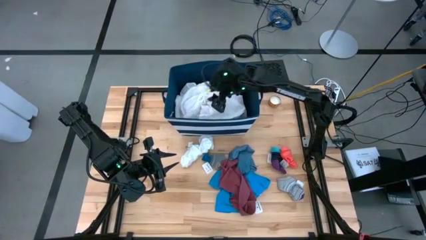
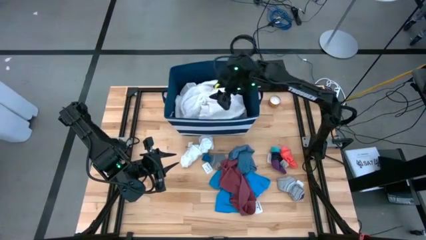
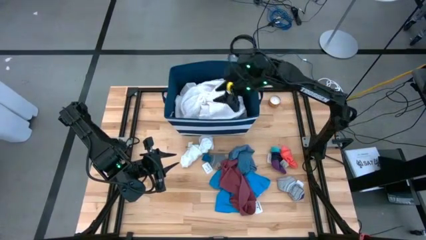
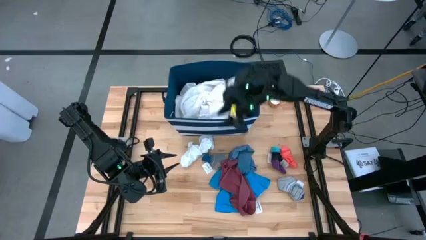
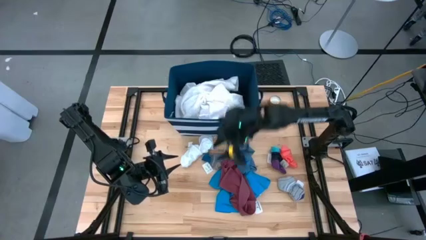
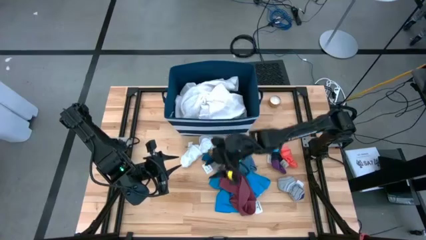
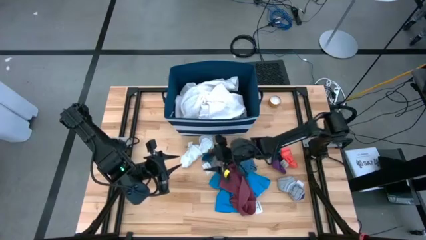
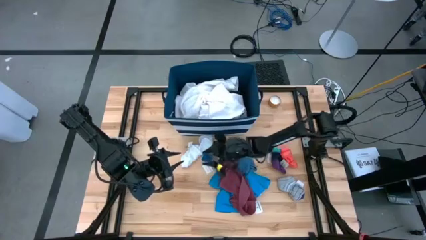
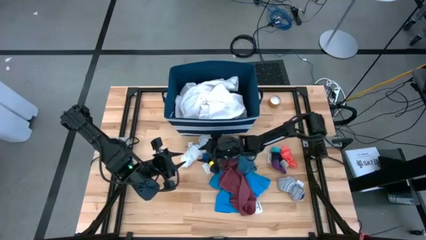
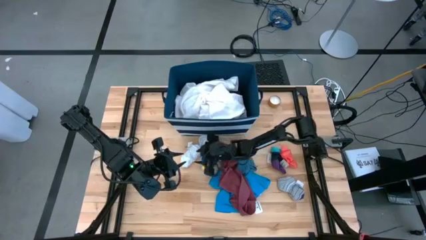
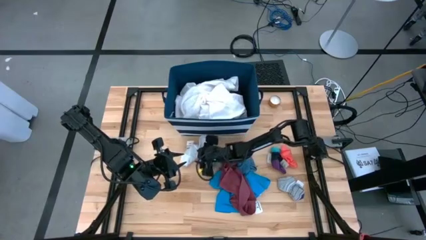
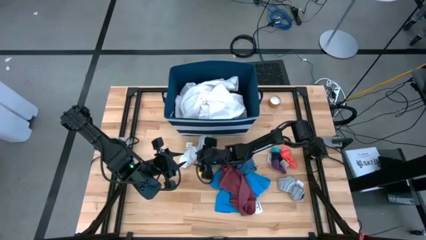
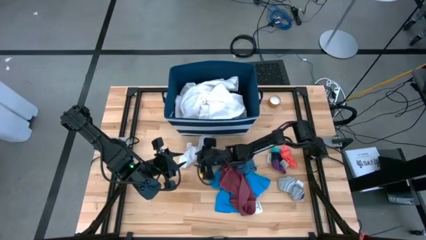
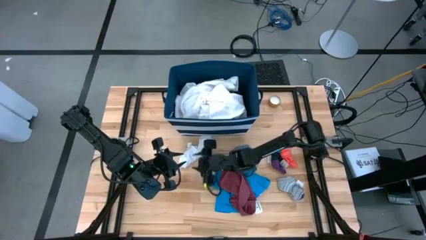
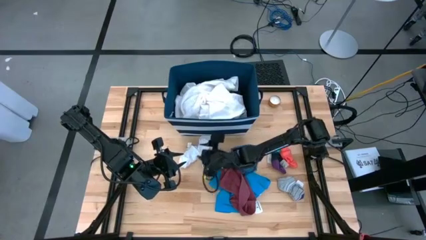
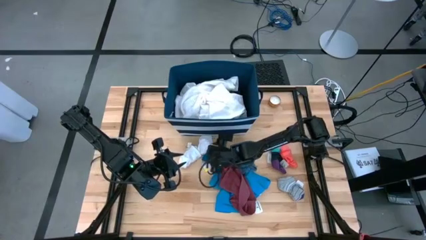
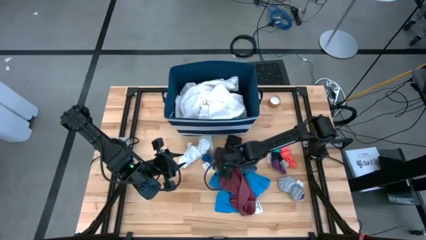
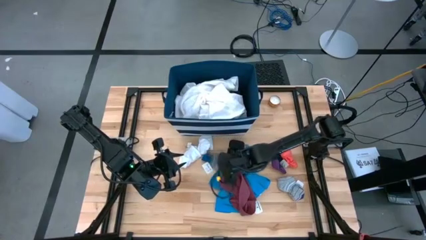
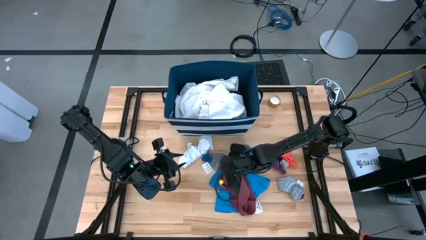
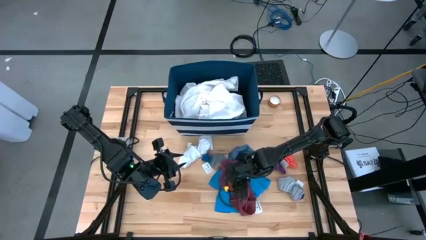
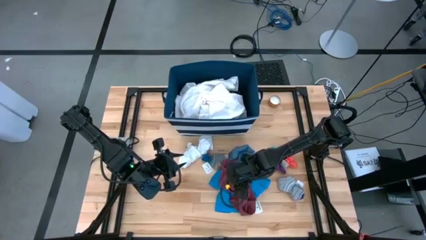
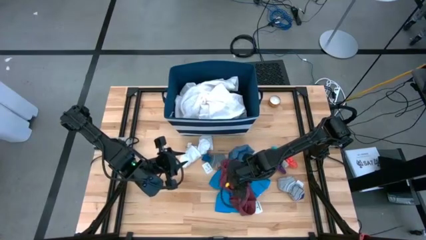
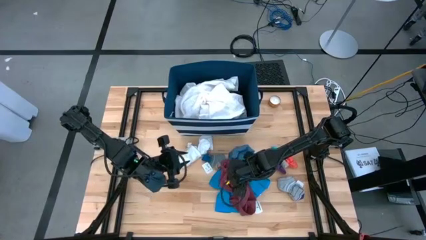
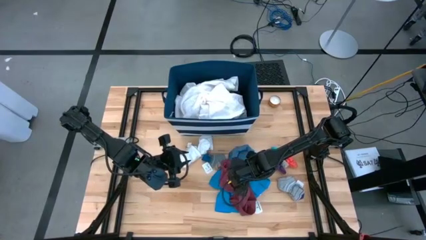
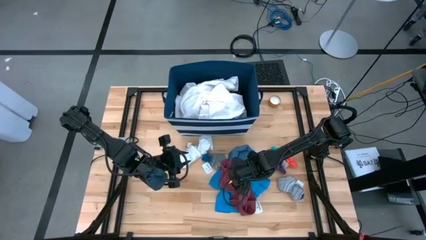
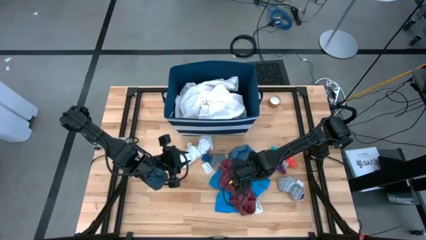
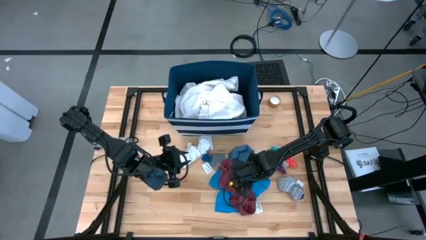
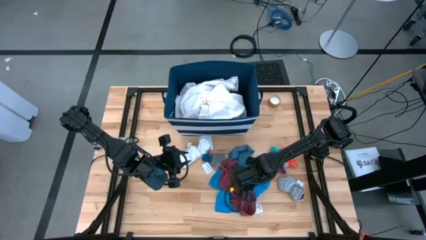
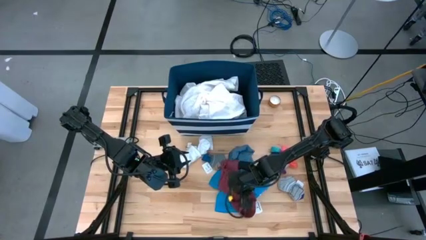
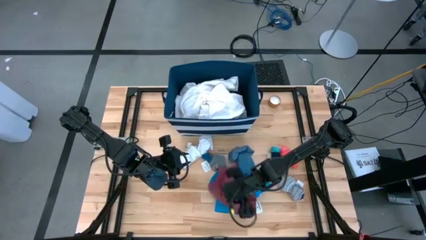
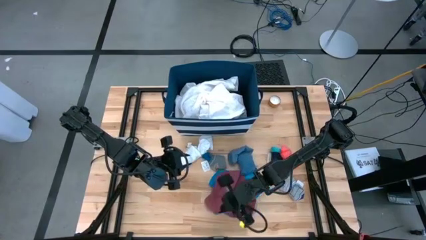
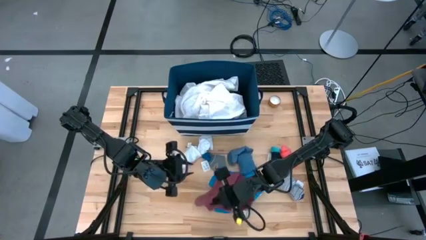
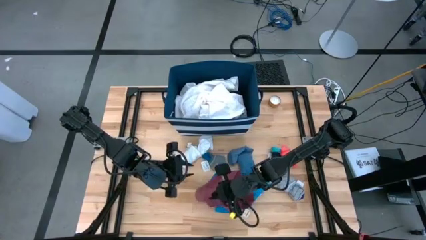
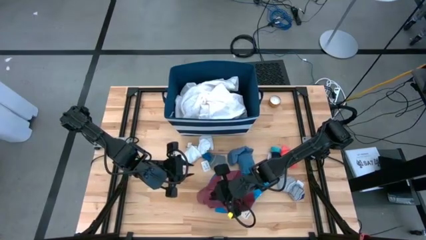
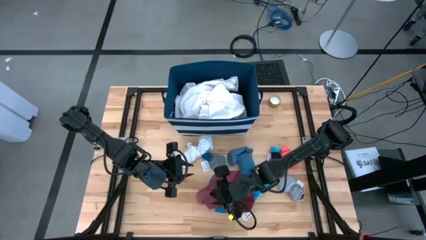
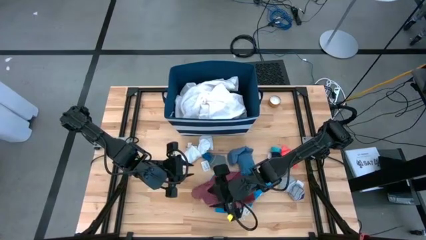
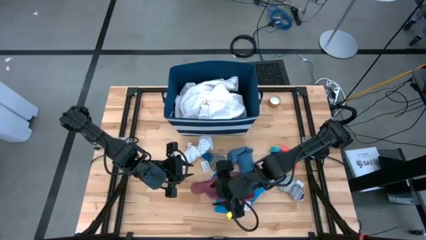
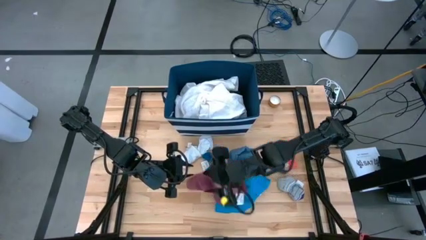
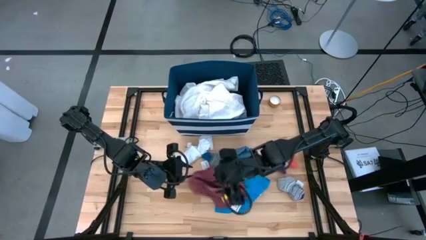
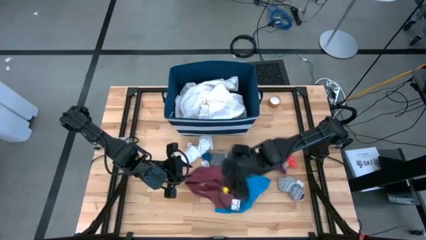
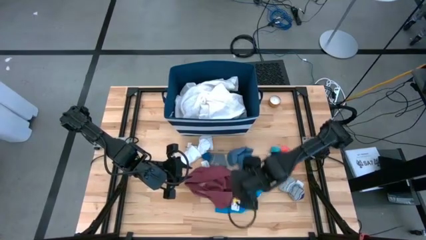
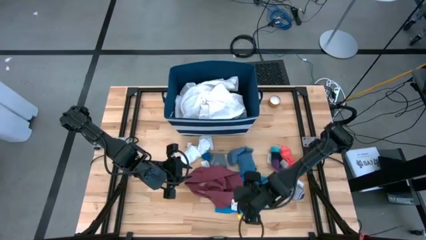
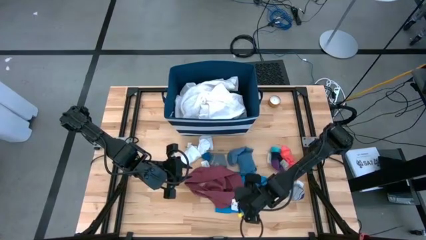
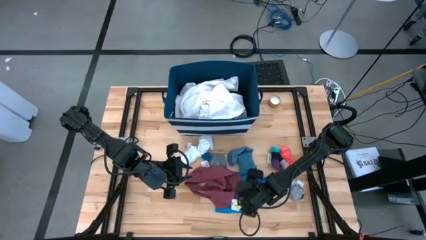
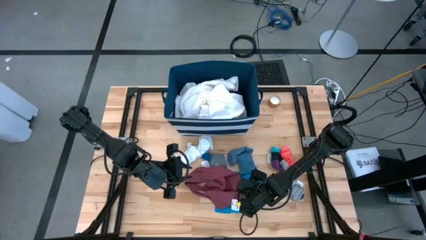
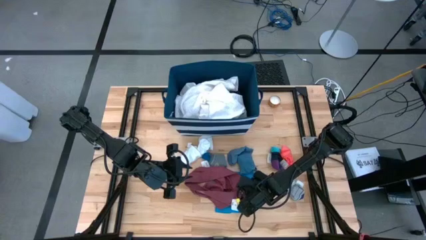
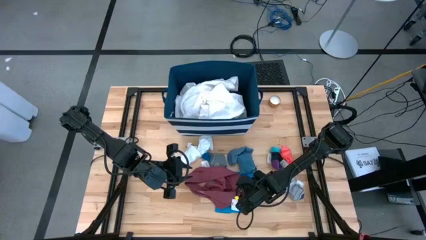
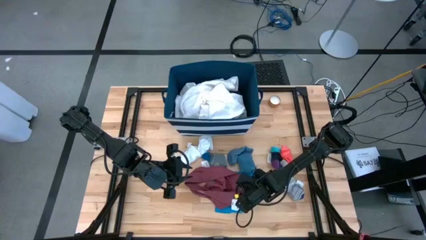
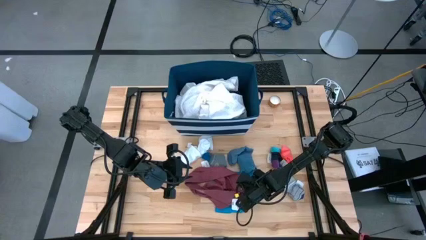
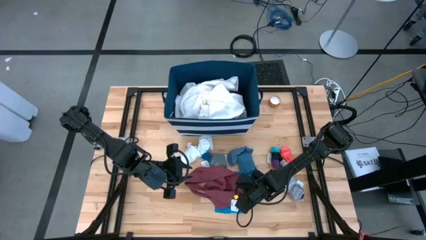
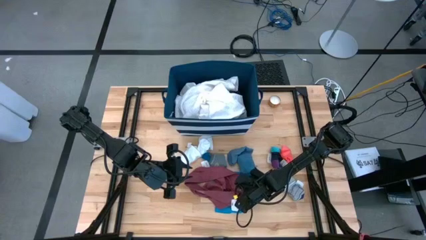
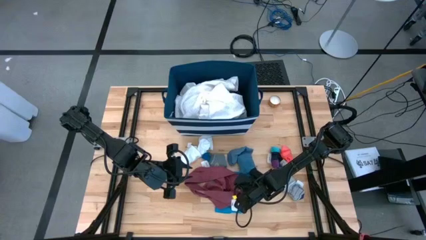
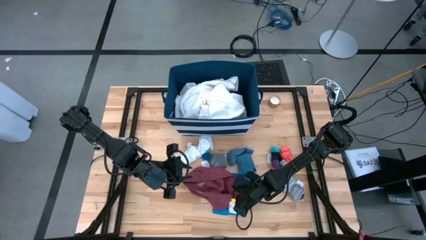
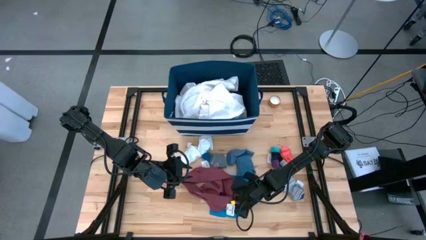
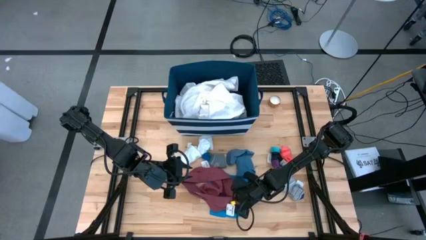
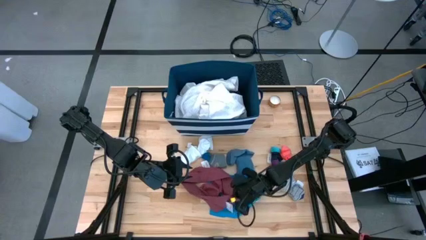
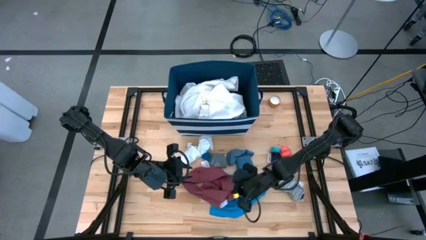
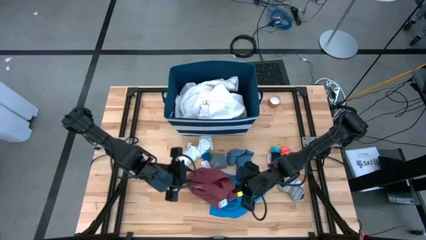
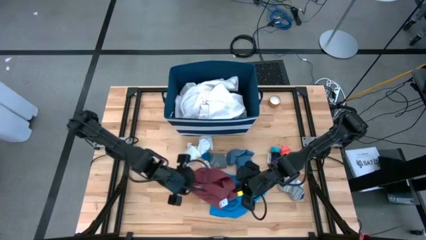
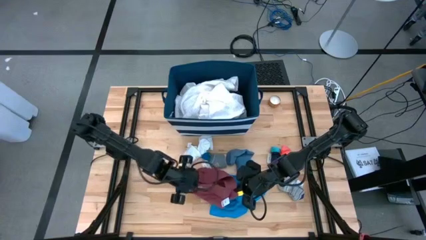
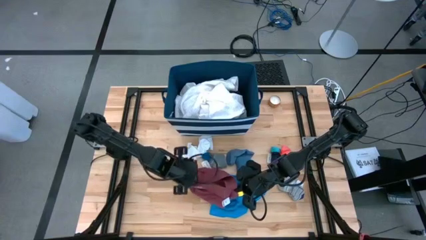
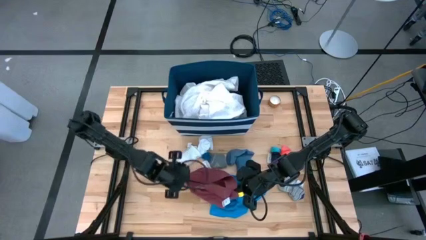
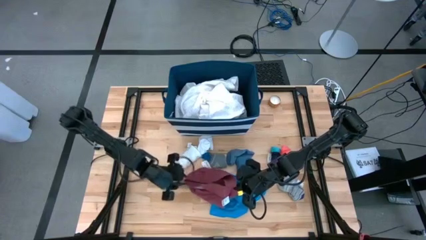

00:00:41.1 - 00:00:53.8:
Task: Sort clothes
Put the maroon underwear into the blue bin
